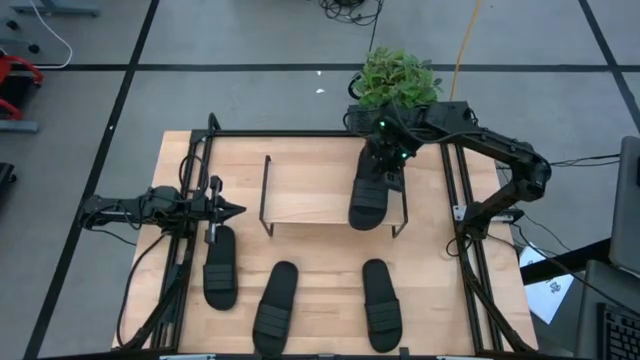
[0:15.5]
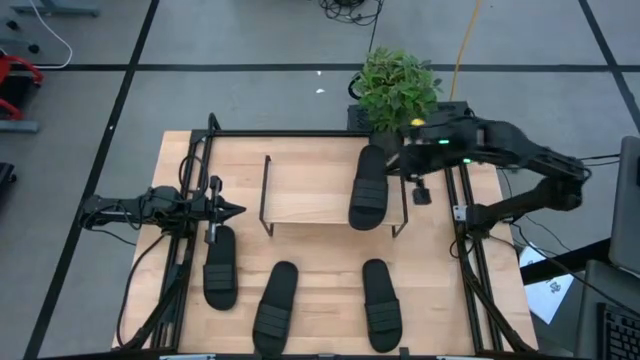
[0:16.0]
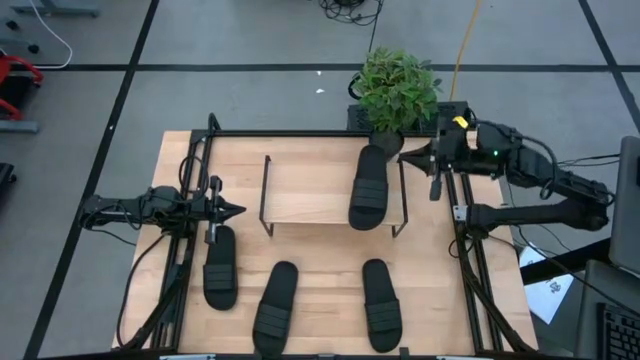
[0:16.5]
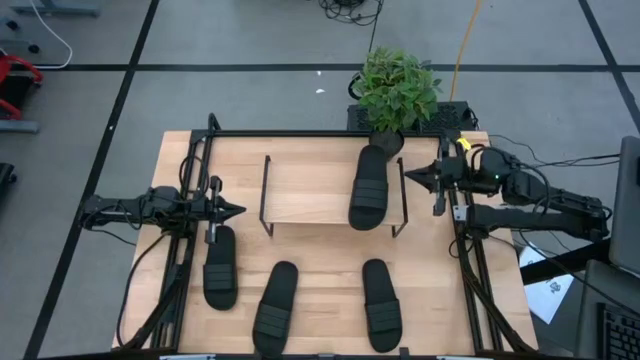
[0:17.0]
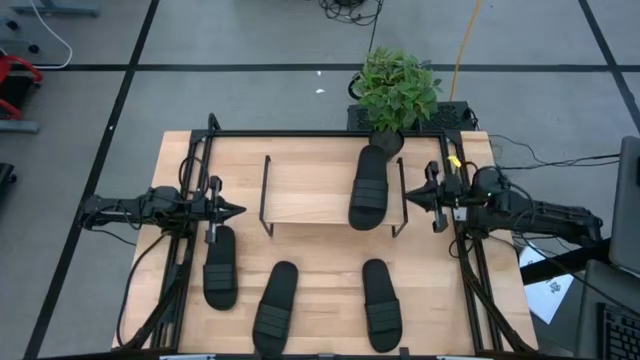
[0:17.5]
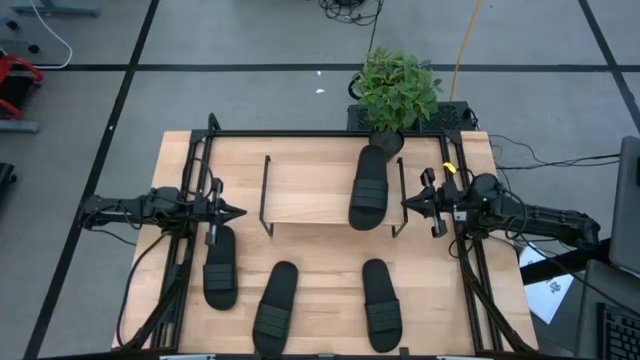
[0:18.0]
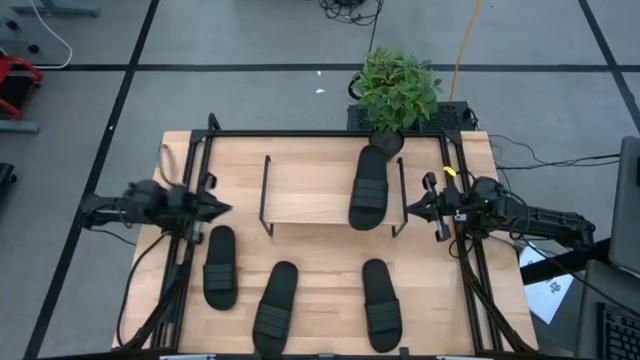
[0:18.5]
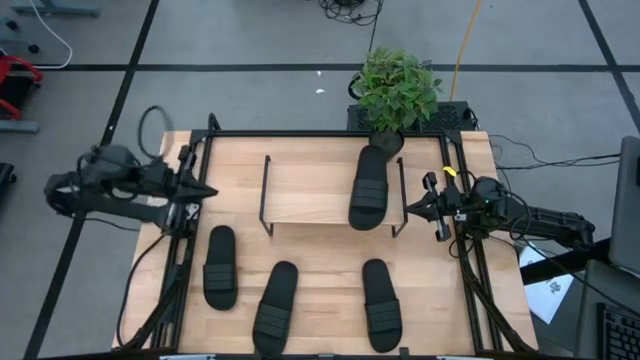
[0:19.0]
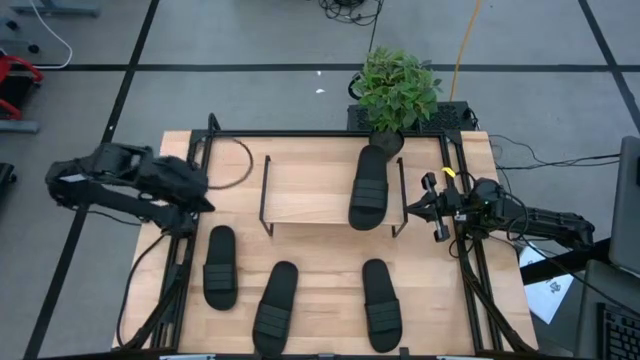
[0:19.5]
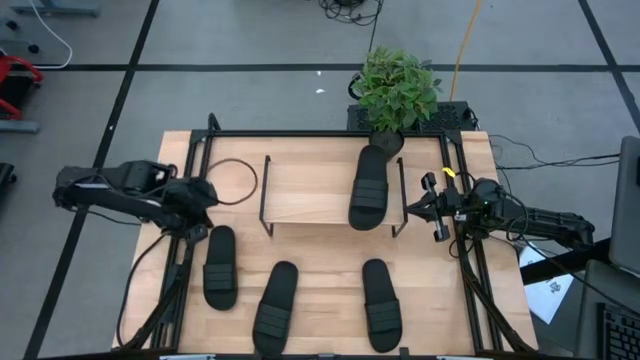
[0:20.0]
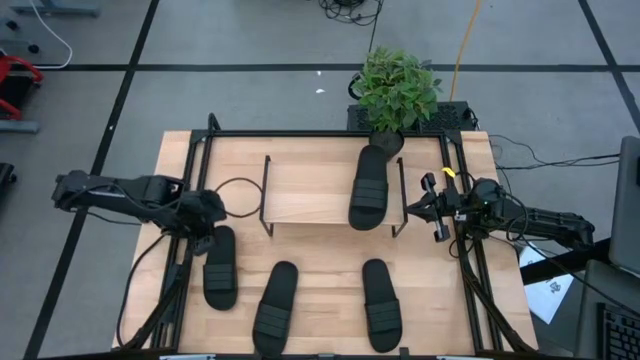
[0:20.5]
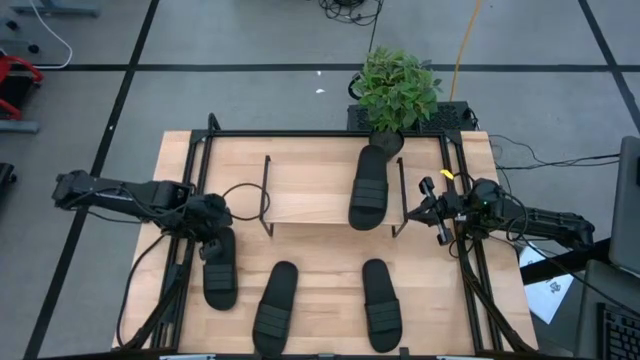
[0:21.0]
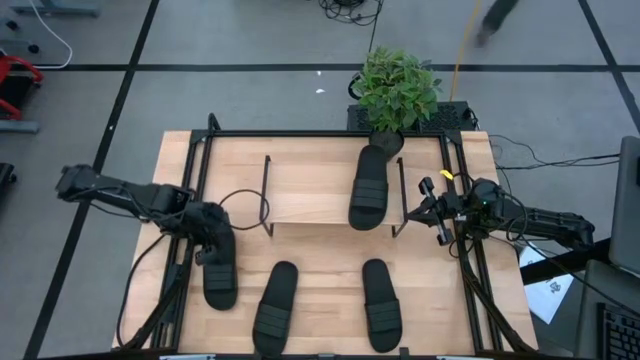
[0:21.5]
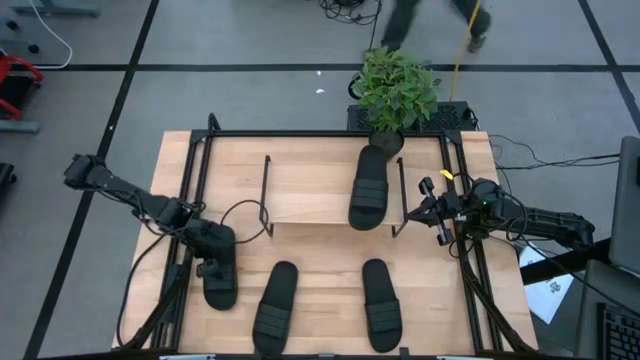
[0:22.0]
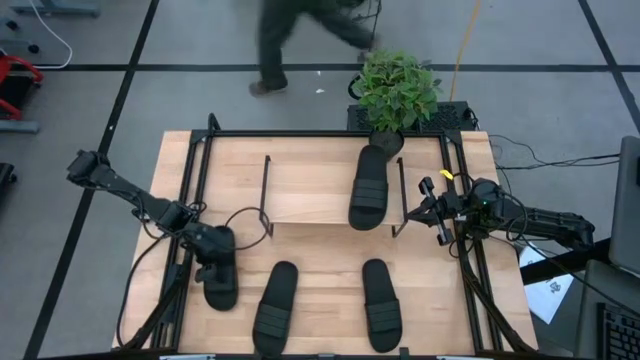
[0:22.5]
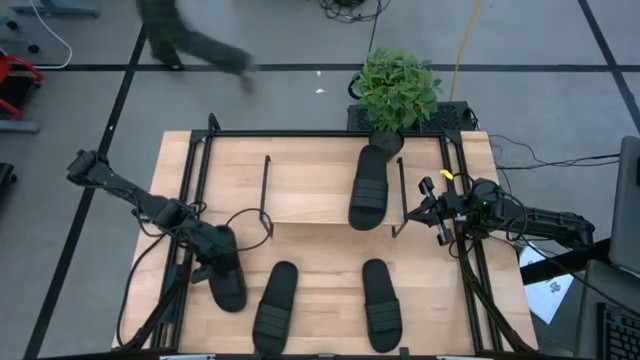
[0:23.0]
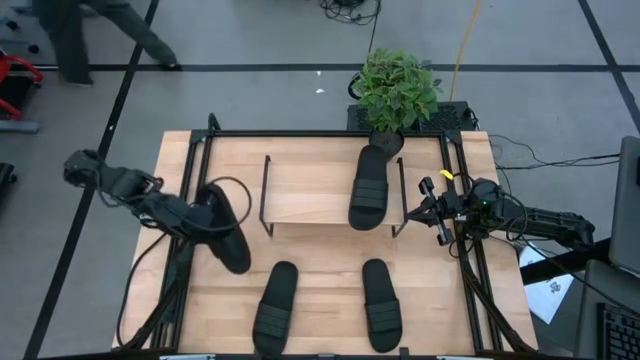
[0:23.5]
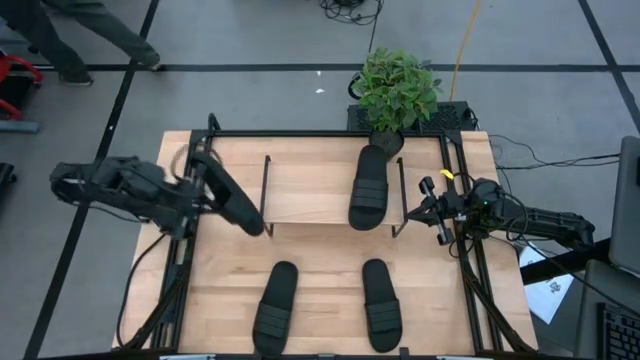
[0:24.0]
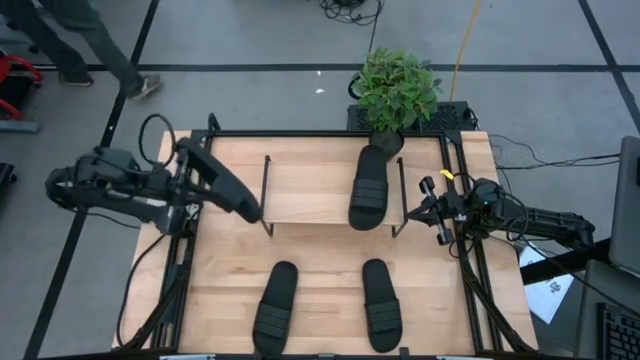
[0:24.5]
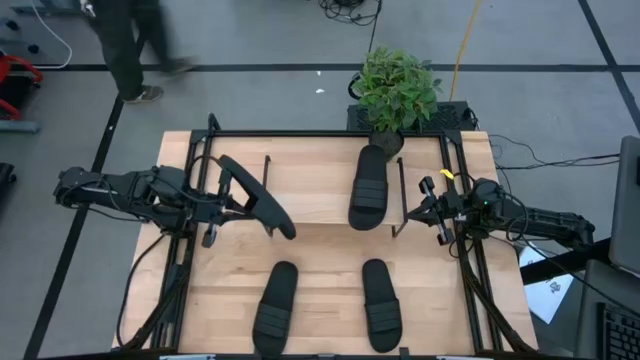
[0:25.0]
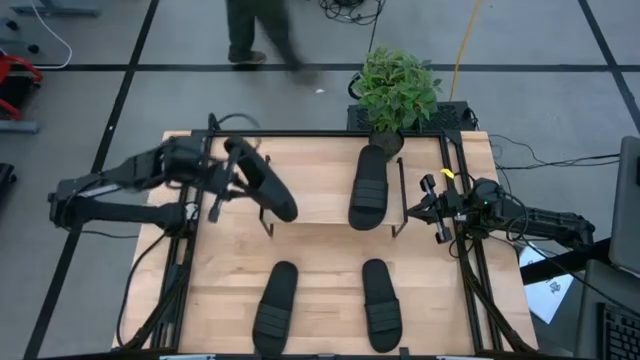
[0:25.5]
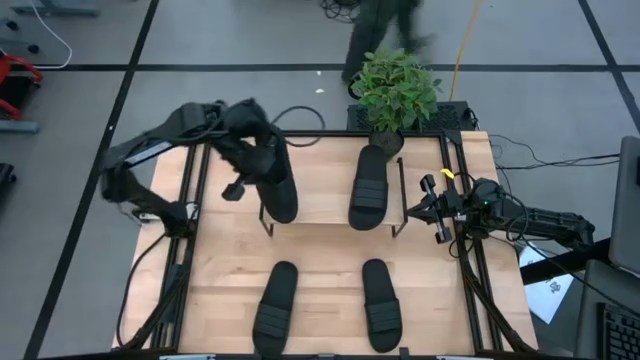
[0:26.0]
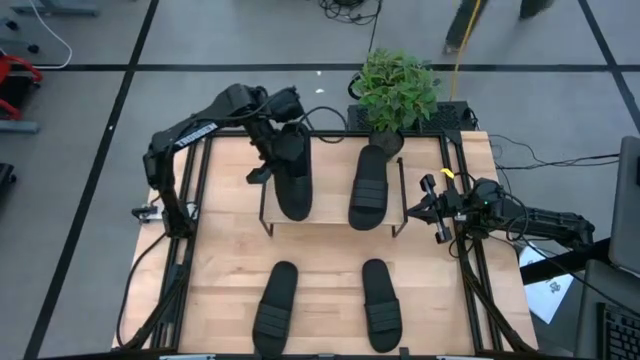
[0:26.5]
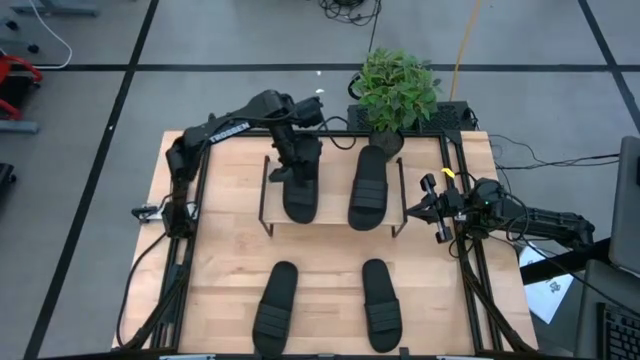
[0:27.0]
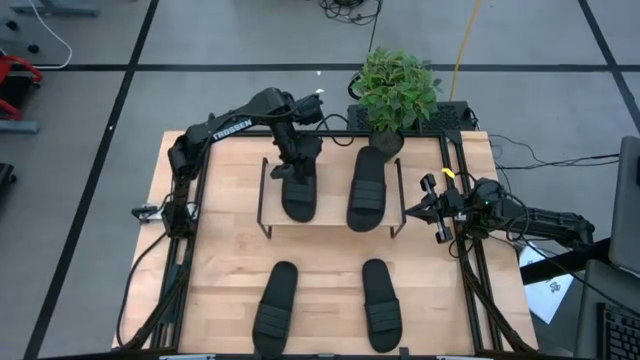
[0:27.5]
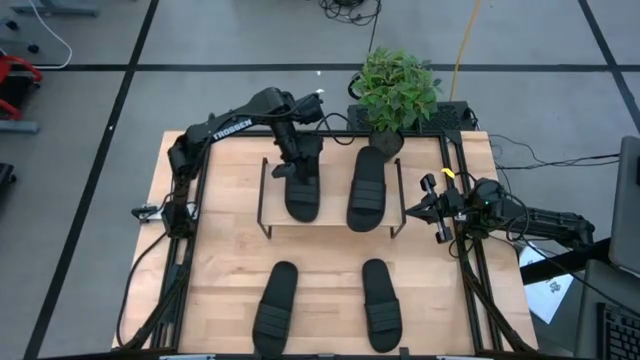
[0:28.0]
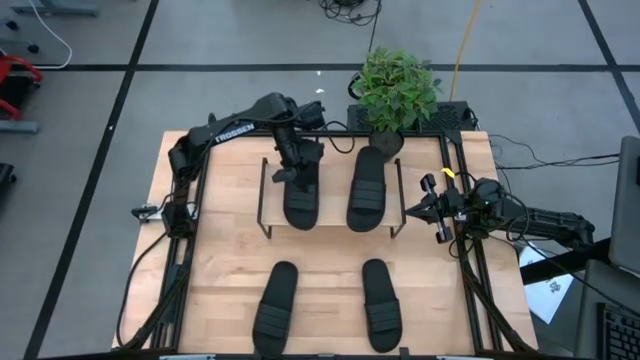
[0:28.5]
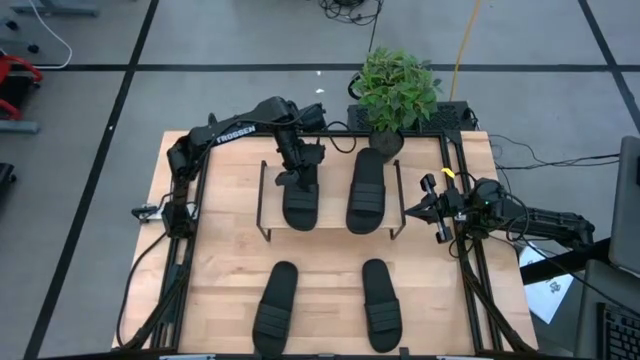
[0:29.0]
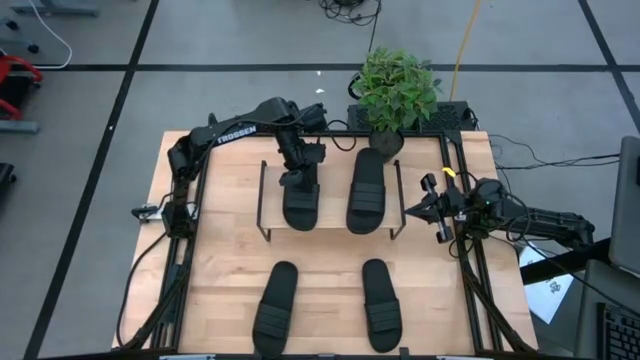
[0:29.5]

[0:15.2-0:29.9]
Task: Pick and place slides into the shelf
Put the top left black slide on the shelf

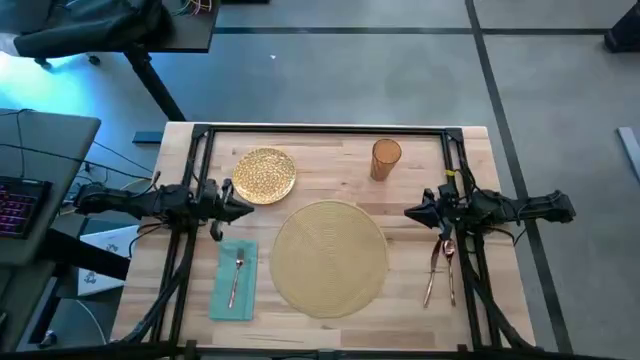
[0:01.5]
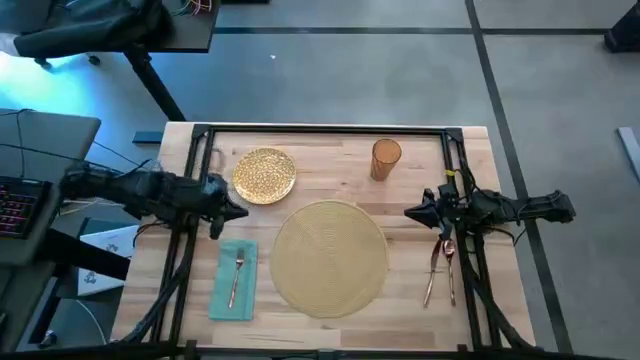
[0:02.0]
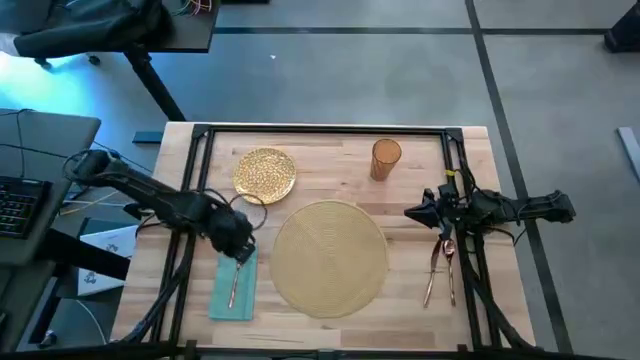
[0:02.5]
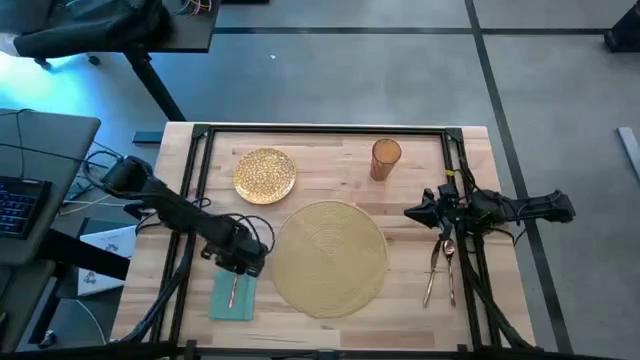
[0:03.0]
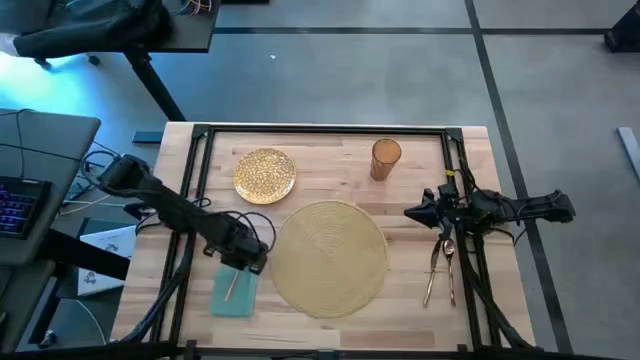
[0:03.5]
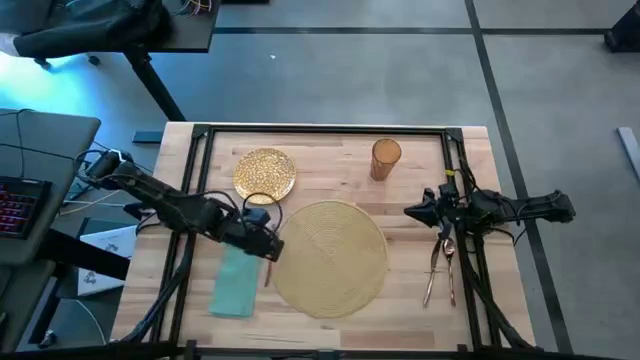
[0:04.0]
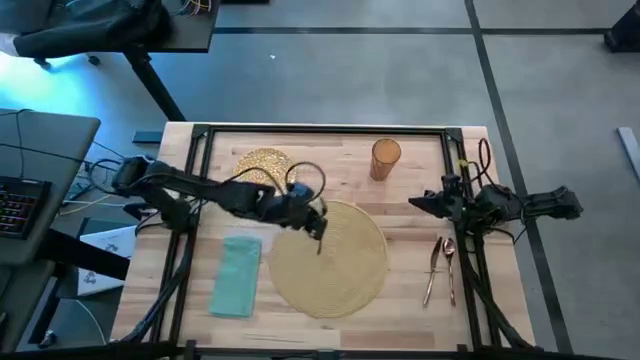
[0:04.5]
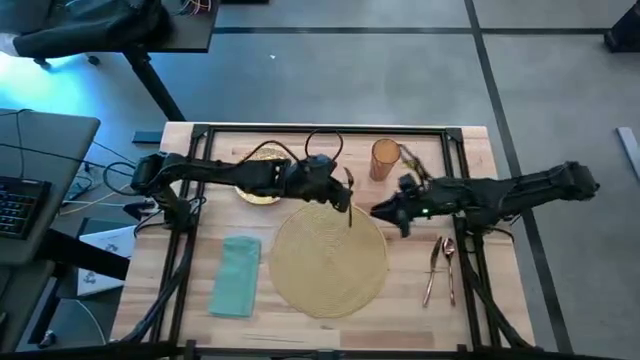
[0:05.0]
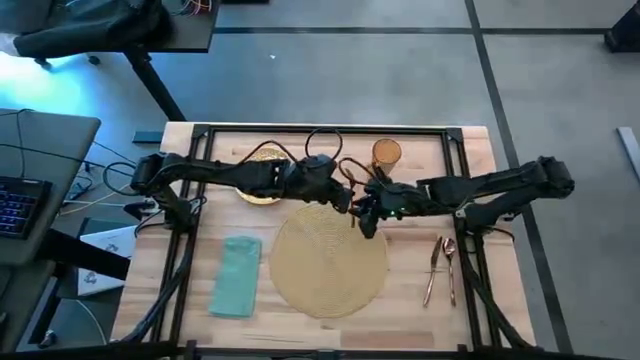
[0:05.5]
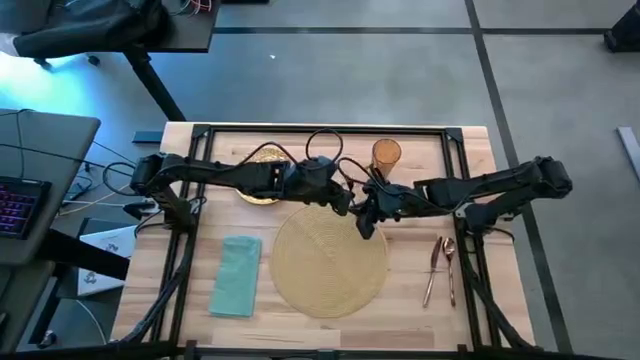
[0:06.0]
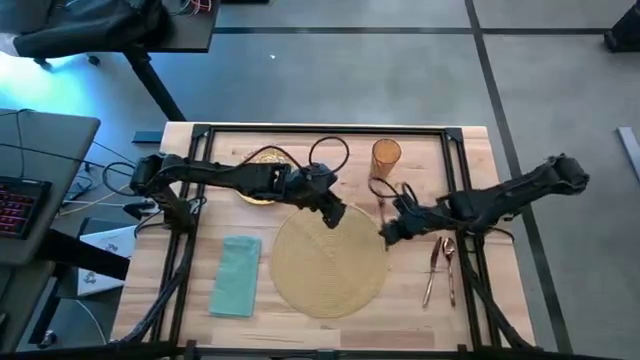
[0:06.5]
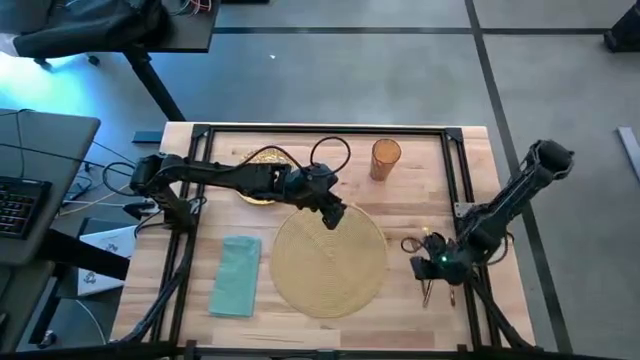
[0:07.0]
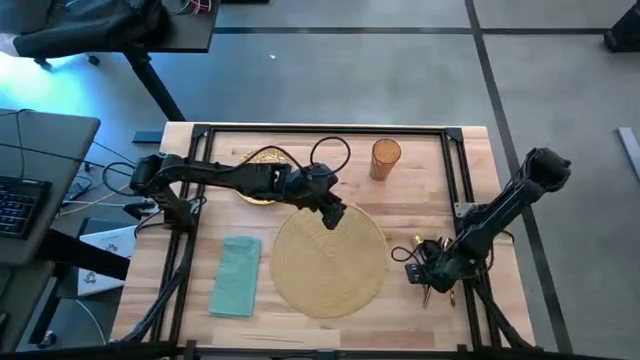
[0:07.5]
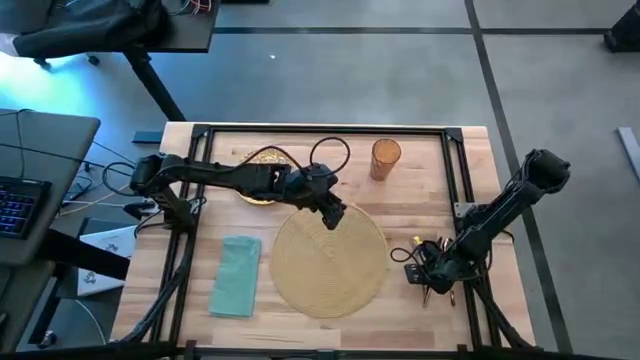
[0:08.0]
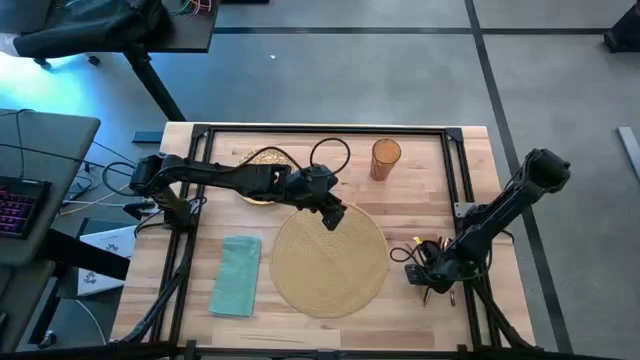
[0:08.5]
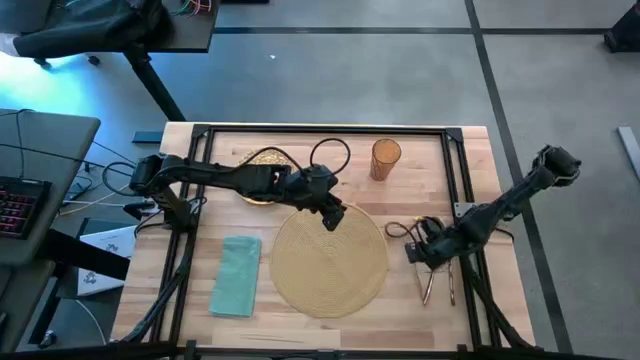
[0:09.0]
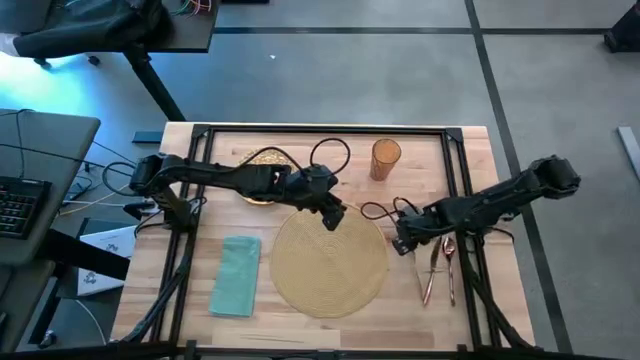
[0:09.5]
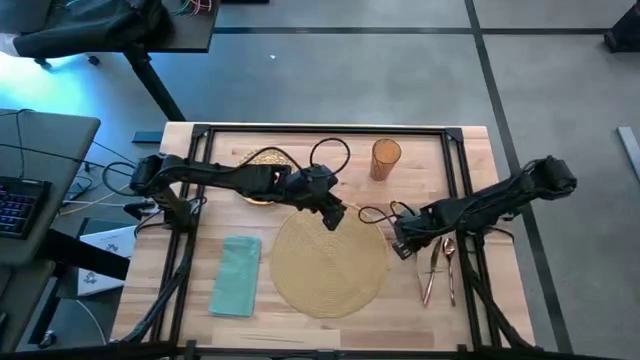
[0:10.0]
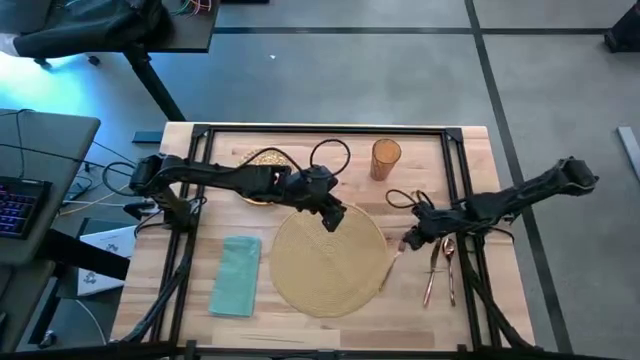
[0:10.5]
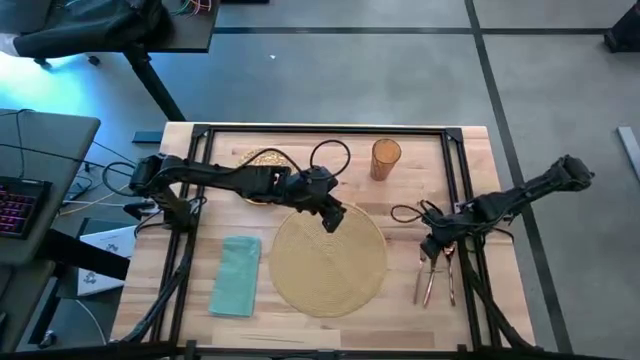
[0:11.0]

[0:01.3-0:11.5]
Task: Set table place
Put the fork to the left of the knife
